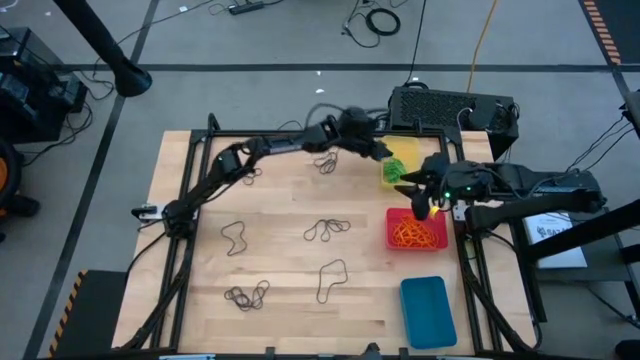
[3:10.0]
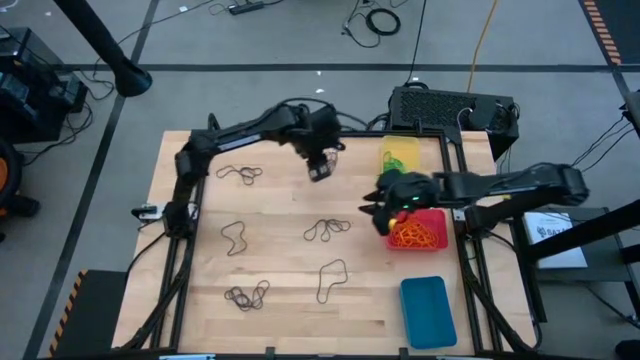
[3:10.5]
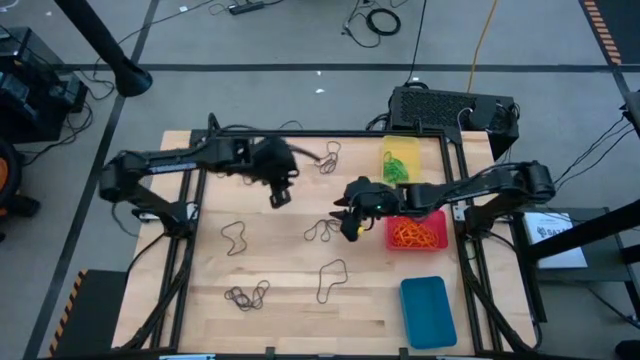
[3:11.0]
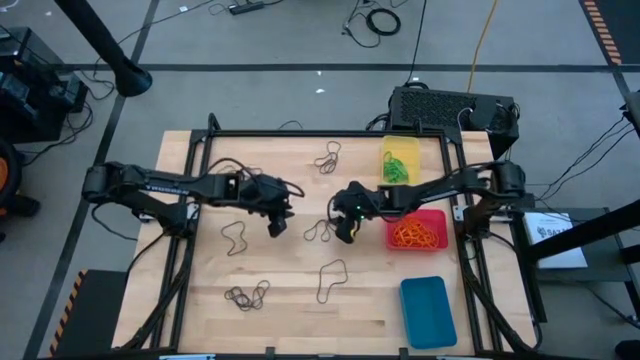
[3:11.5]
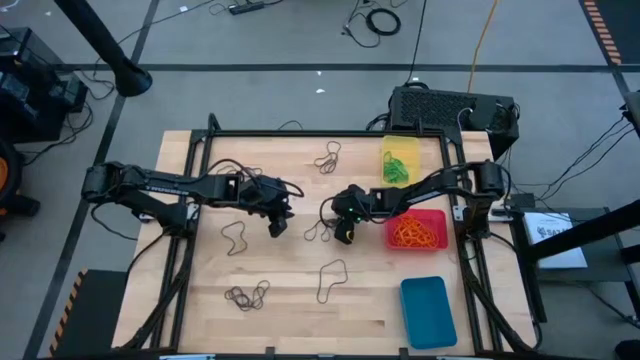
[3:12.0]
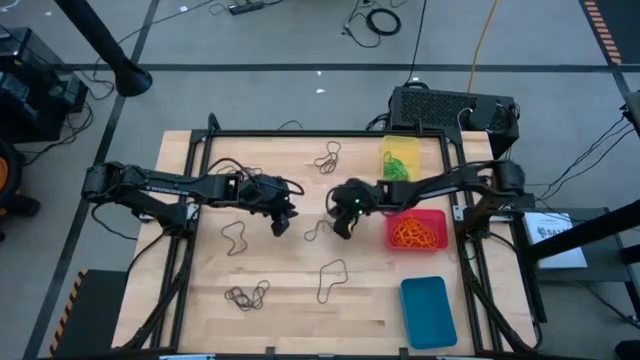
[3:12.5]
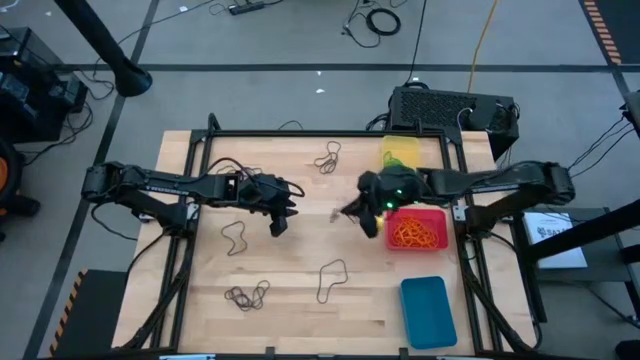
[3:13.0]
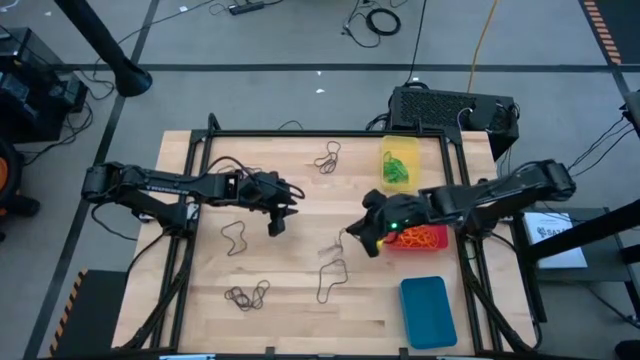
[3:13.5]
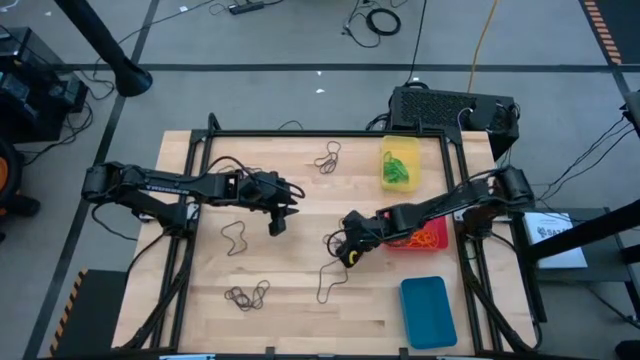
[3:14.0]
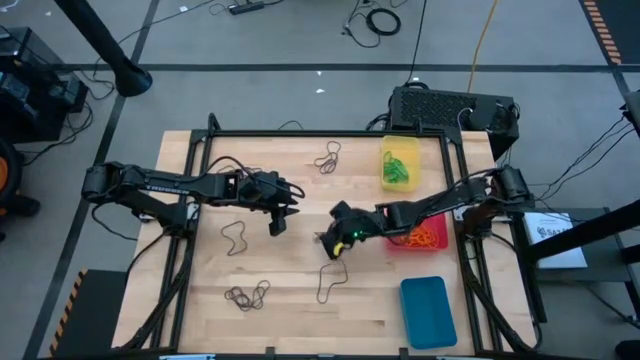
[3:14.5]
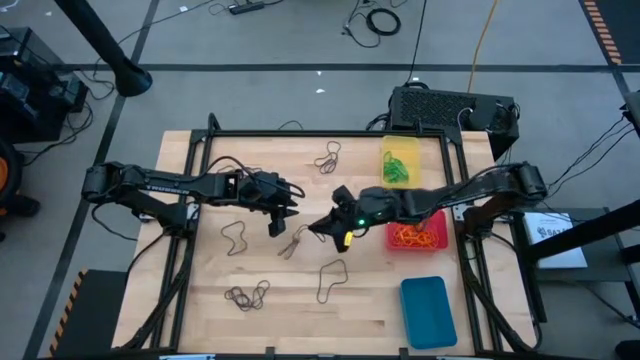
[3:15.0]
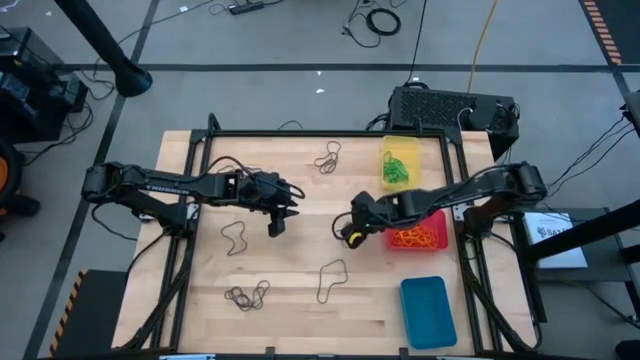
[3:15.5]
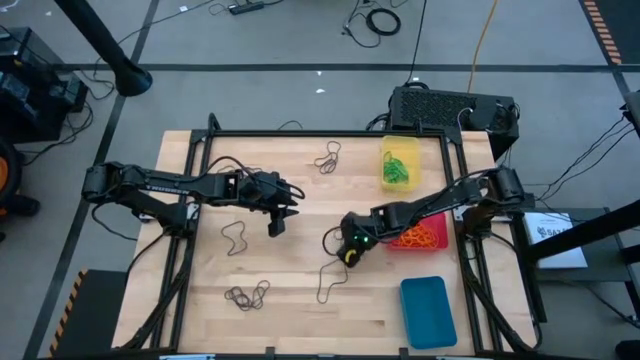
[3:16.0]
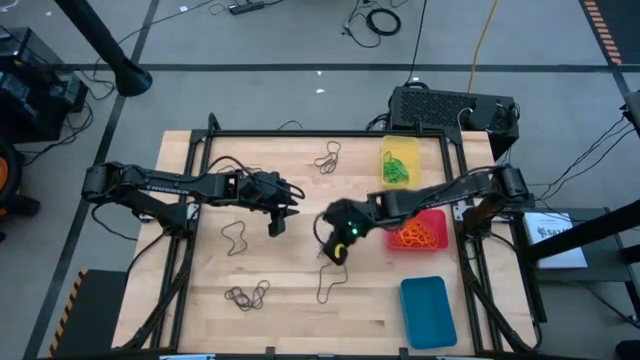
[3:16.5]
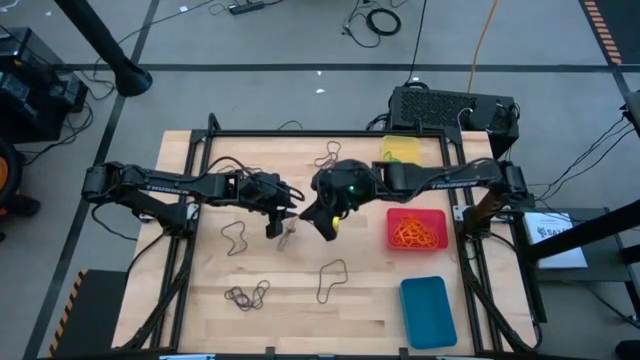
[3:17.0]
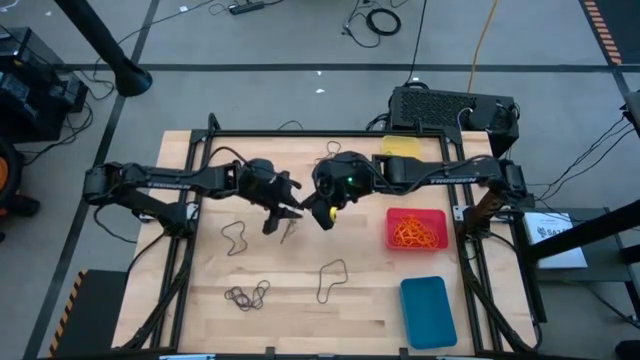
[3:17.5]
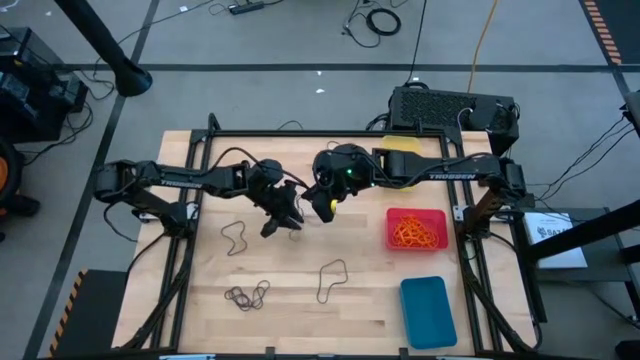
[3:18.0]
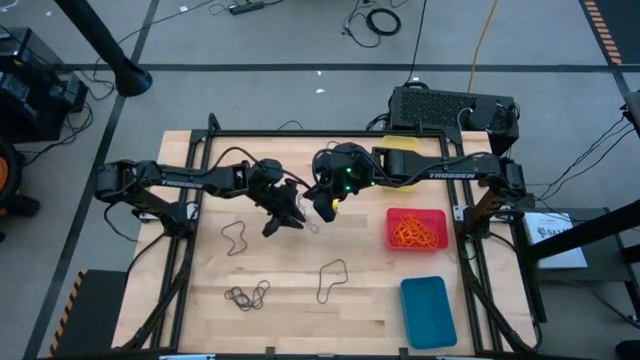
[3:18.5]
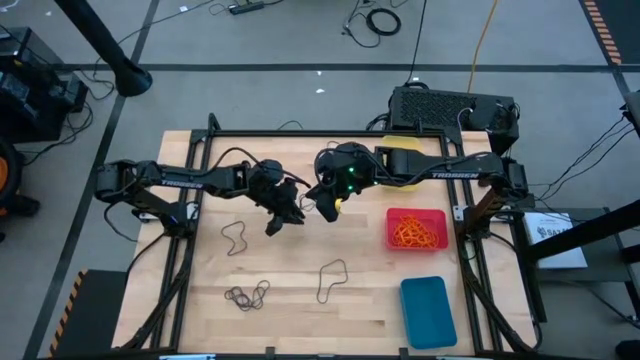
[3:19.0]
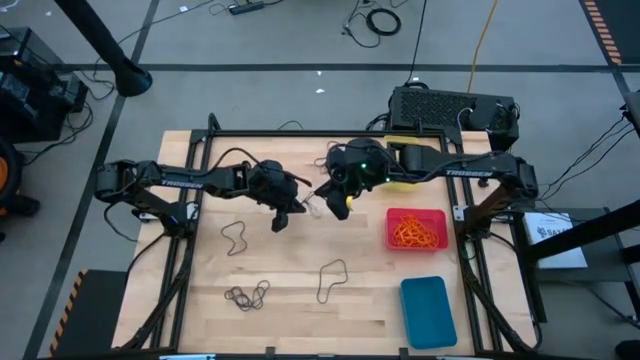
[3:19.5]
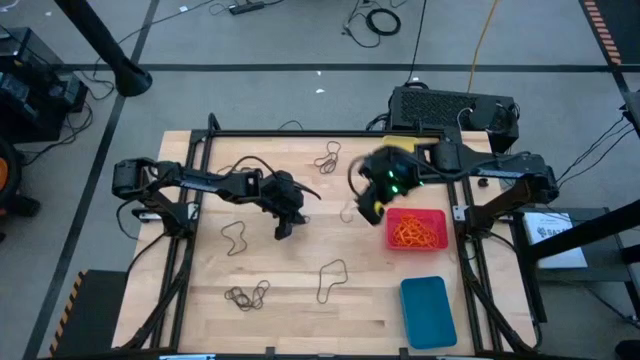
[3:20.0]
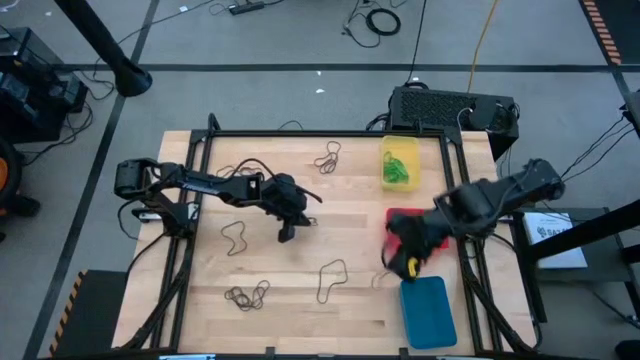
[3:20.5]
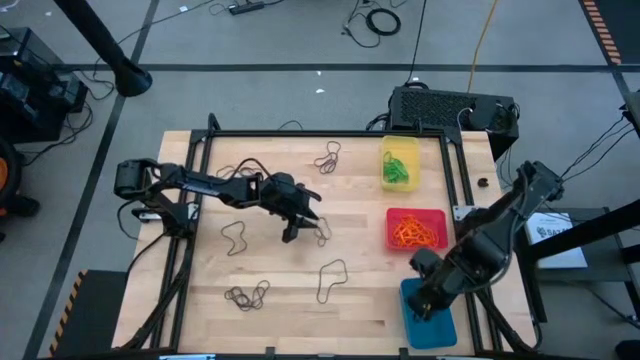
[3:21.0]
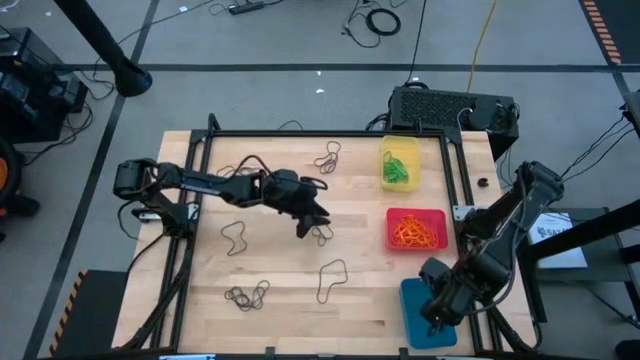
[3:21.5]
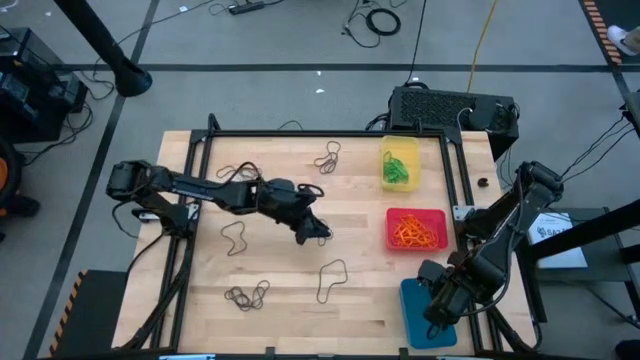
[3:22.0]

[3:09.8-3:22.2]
Task: Sort rubber bands into baskets
Put the violet rubber band into the blue bin

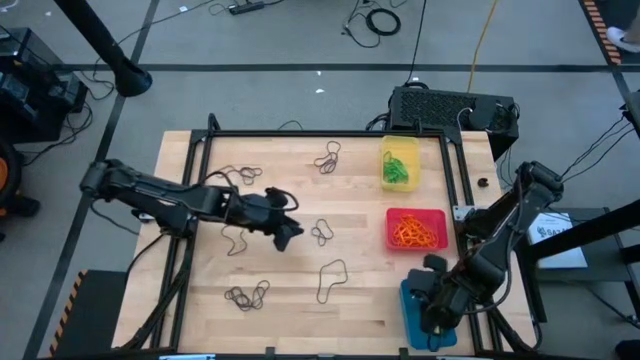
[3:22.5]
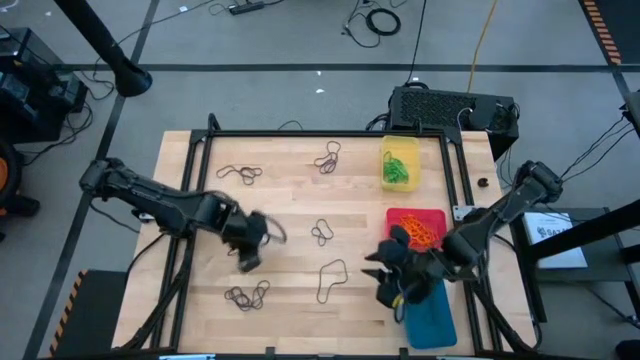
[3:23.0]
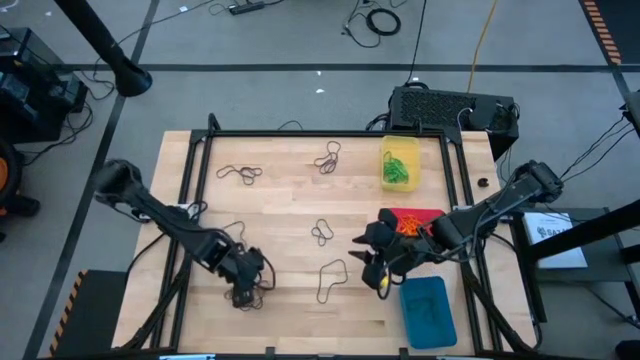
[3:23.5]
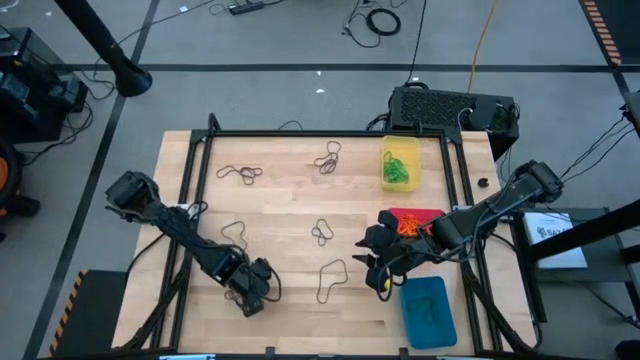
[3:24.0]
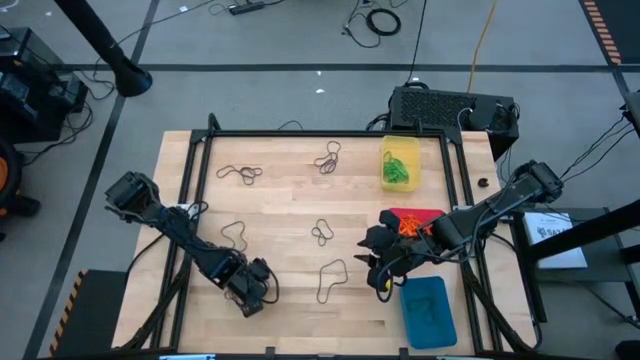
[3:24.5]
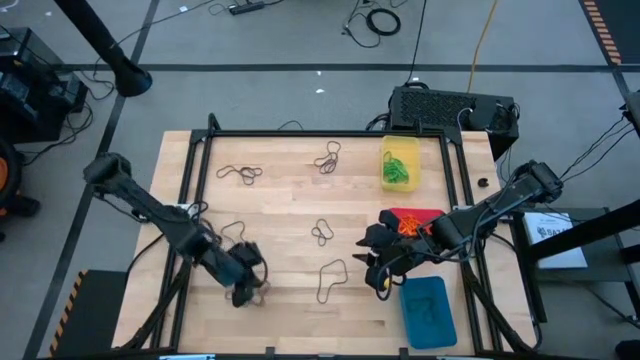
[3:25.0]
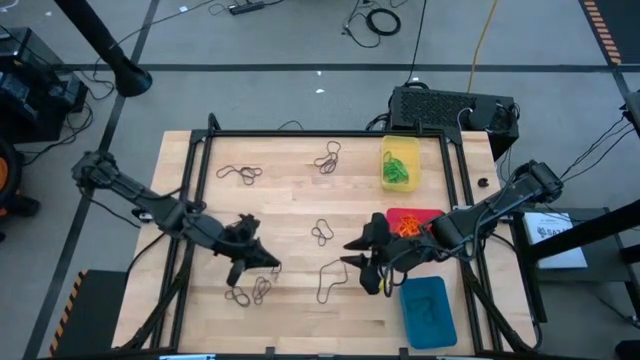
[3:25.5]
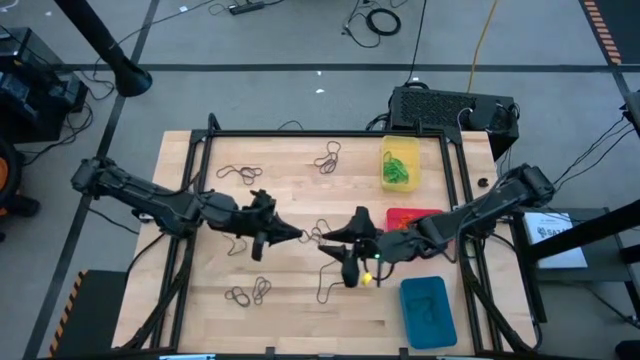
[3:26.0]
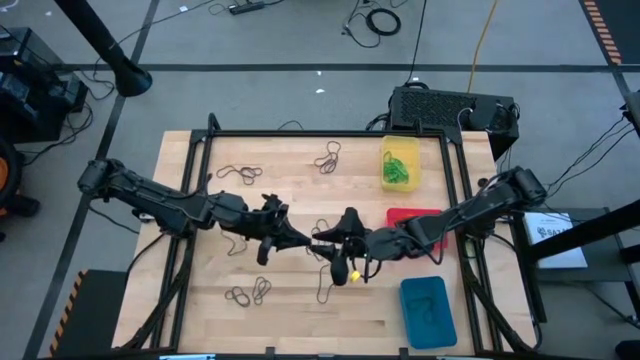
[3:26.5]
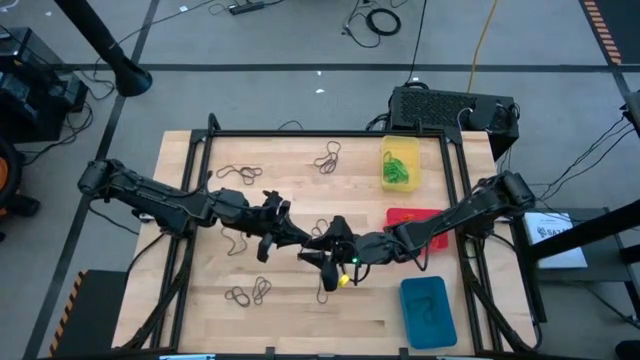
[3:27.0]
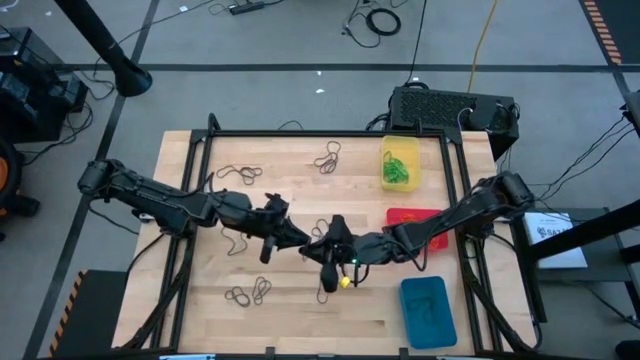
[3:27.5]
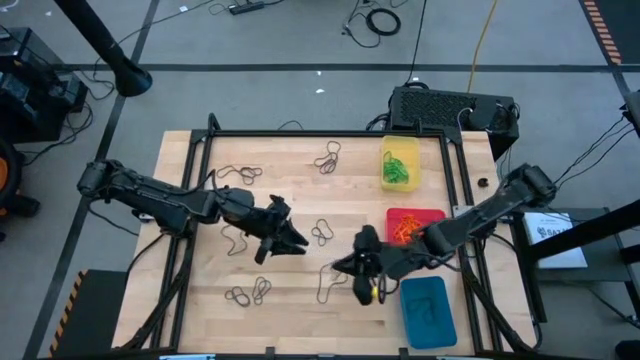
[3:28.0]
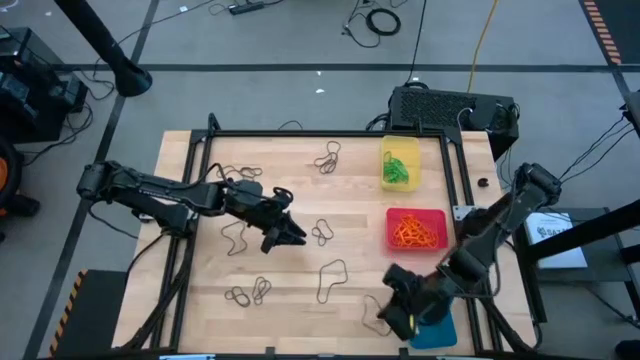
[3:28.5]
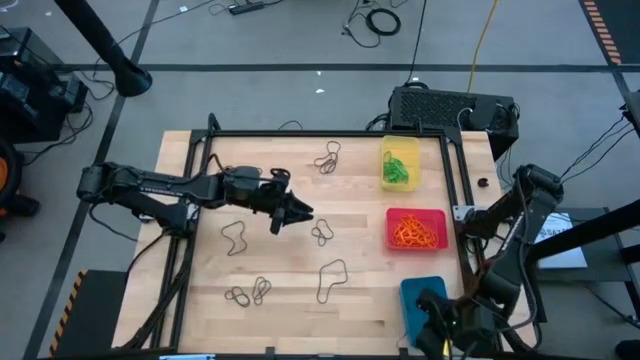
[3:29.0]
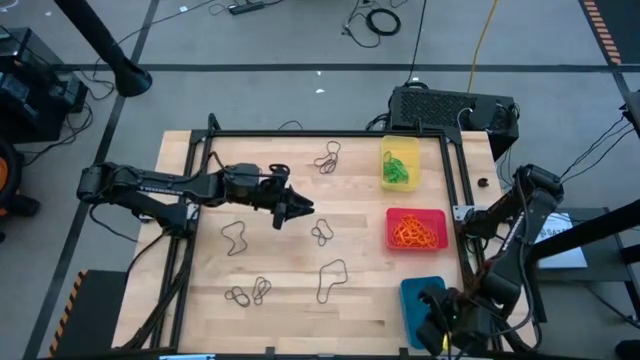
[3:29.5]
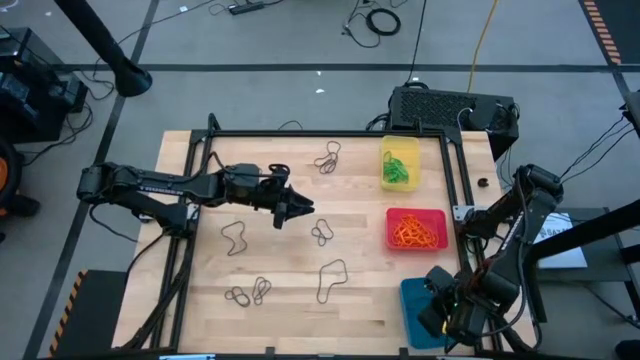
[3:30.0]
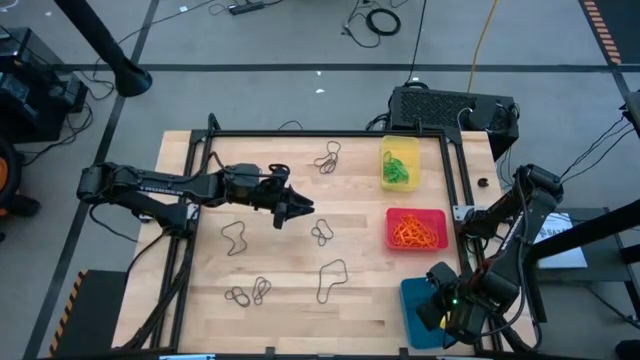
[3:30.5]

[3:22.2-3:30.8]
Put the violet rubber band into the blue bin
